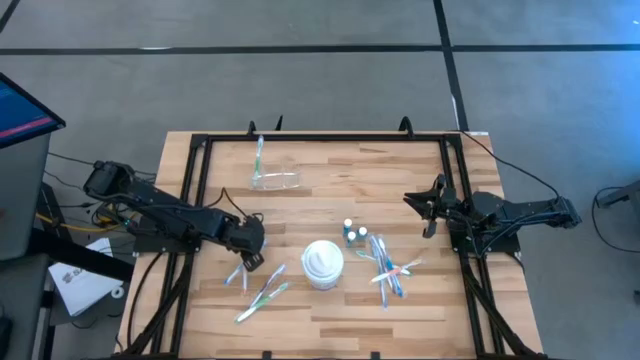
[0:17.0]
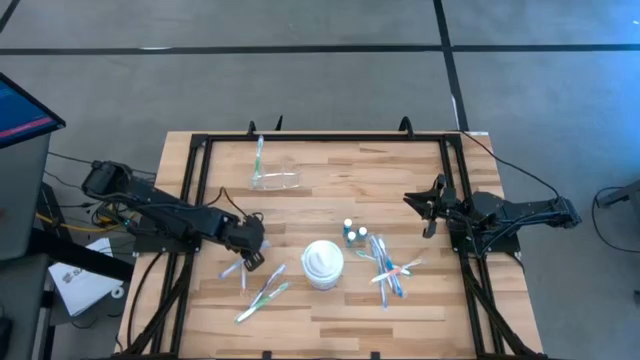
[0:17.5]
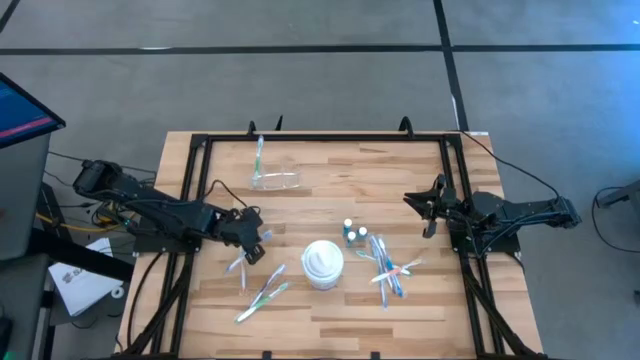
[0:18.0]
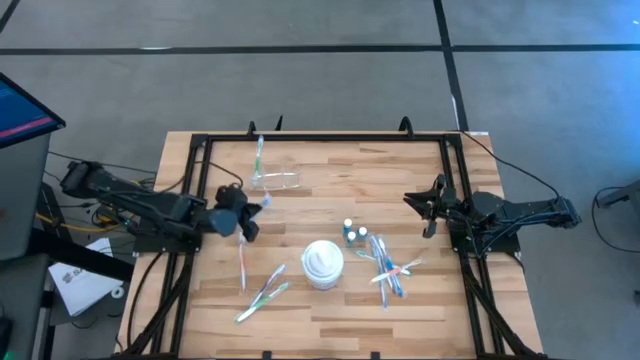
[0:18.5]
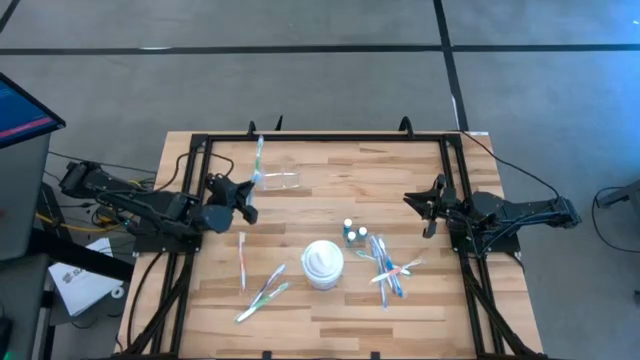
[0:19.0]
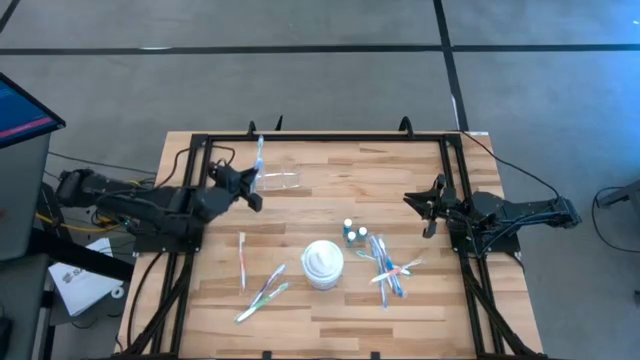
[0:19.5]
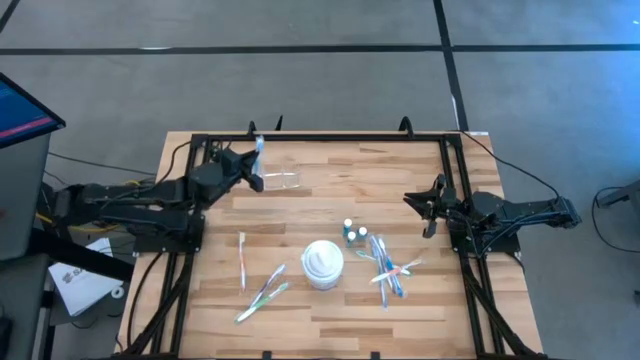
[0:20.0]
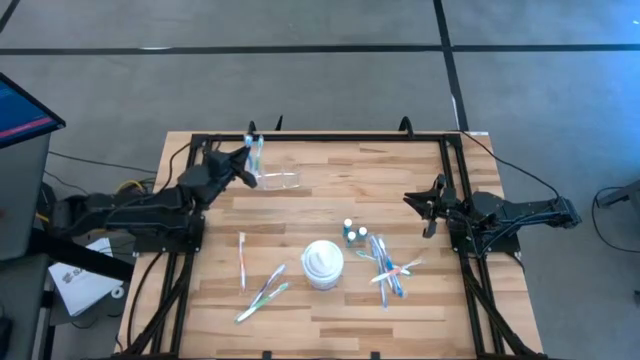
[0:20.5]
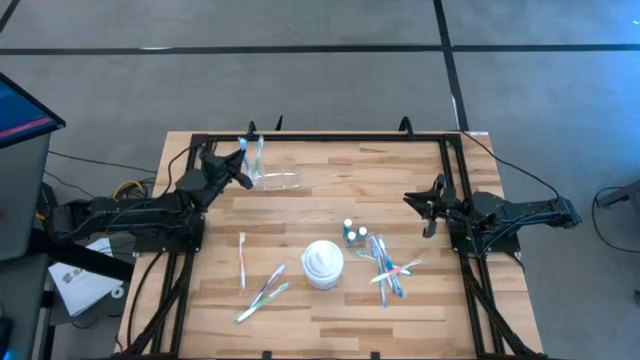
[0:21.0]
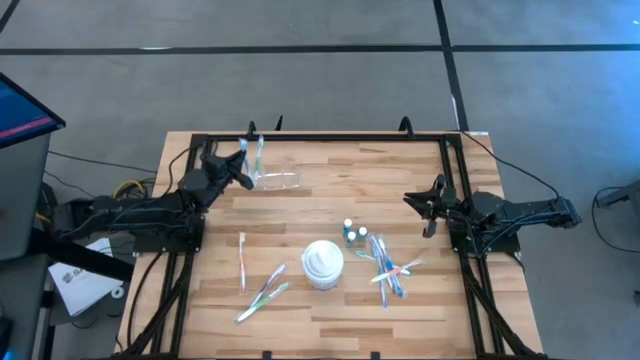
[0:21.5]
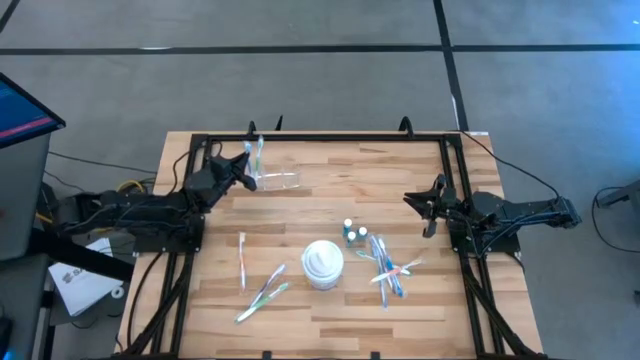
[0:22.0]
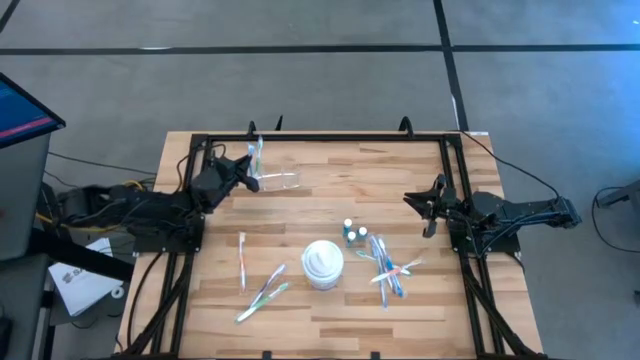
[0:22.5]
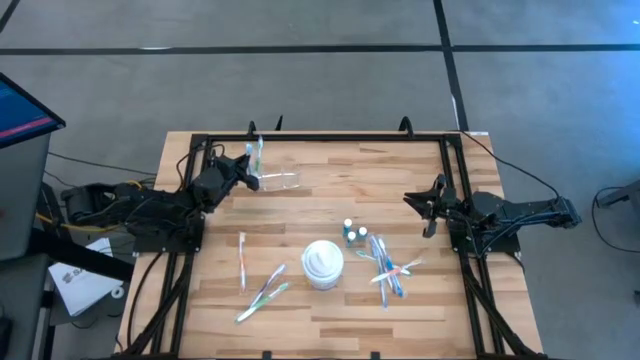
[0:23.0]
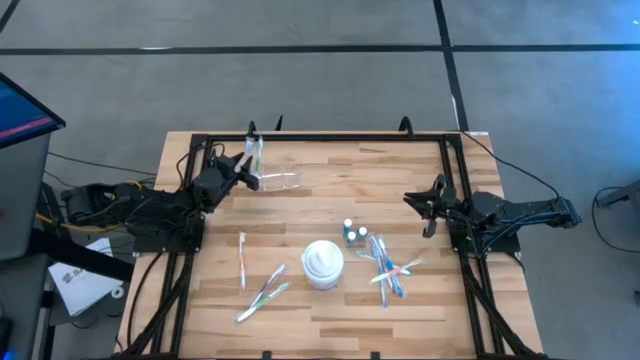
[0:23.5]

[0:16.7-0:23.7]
Task: Pick & Place toothbrushing station
Put the left blue toothbrush into the transparent organizer

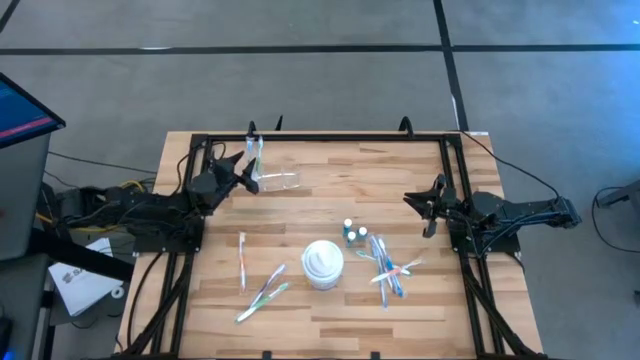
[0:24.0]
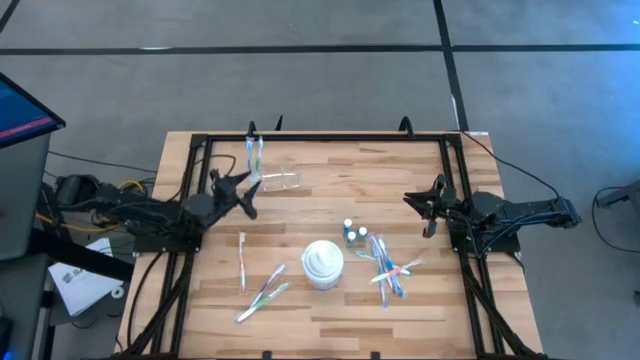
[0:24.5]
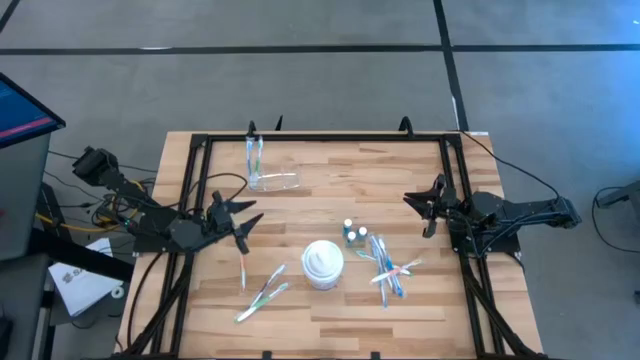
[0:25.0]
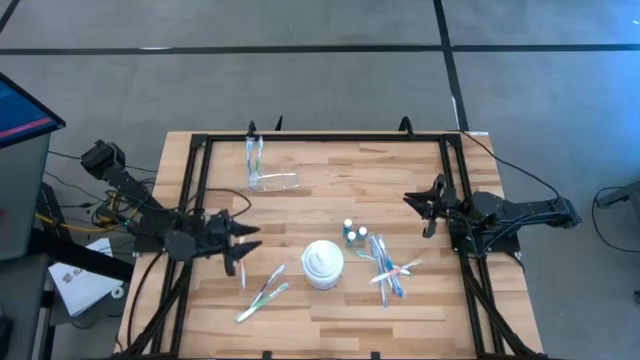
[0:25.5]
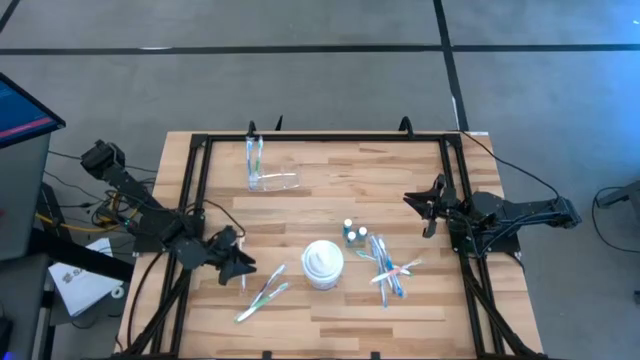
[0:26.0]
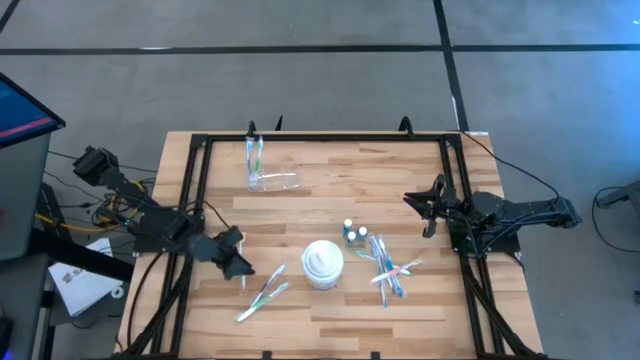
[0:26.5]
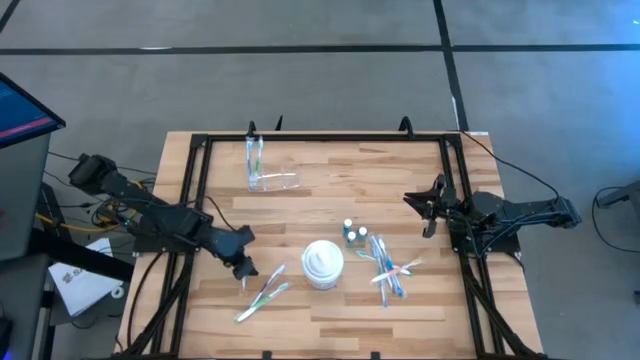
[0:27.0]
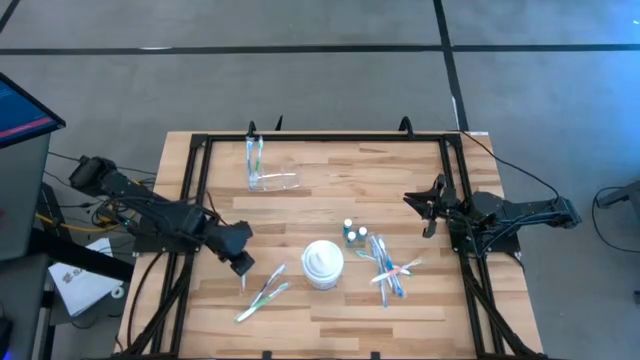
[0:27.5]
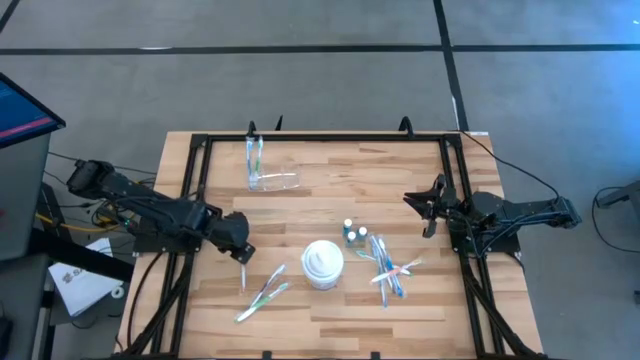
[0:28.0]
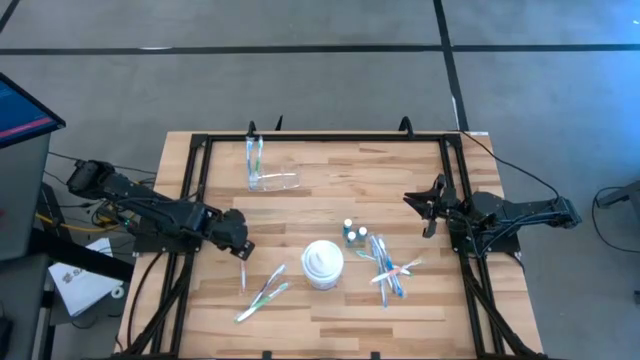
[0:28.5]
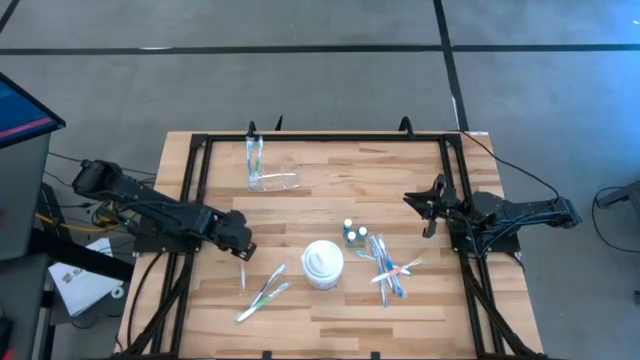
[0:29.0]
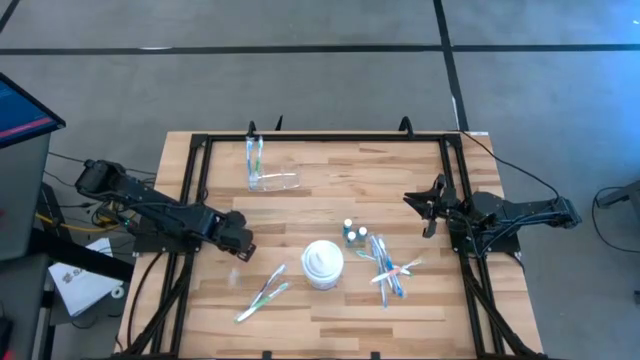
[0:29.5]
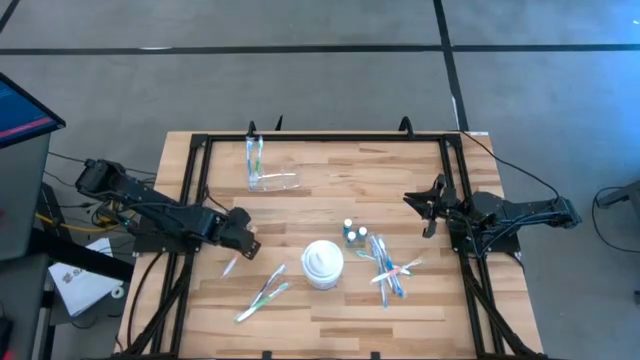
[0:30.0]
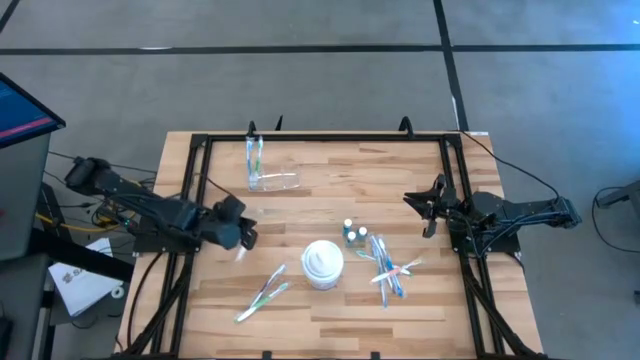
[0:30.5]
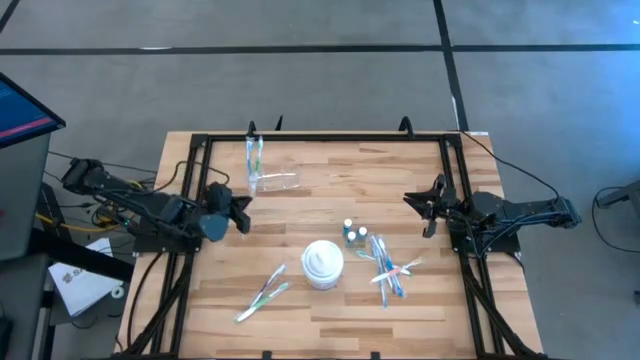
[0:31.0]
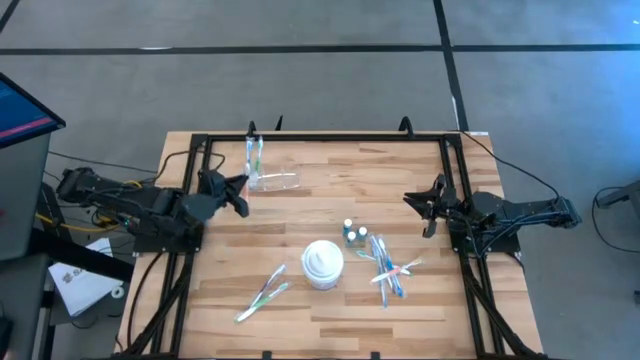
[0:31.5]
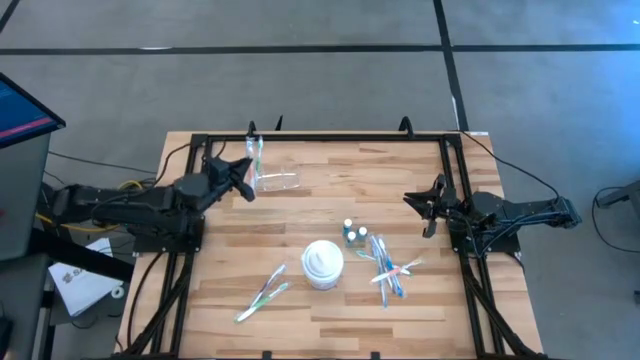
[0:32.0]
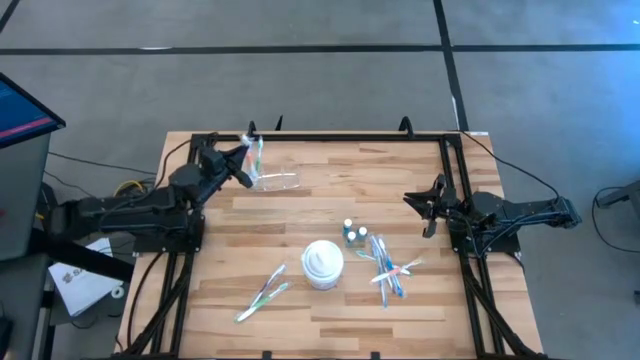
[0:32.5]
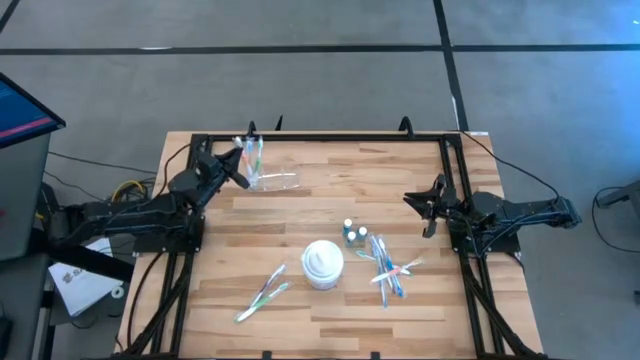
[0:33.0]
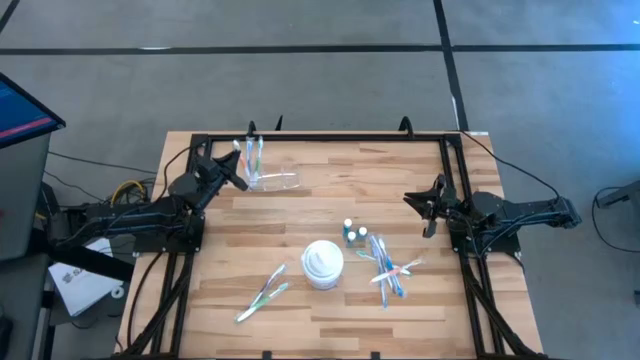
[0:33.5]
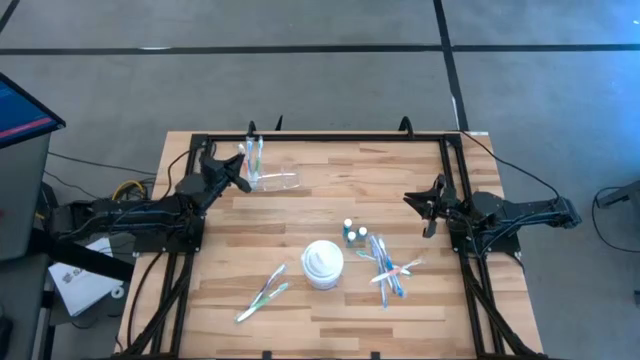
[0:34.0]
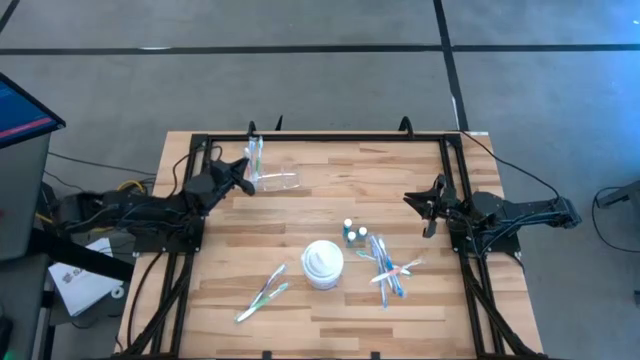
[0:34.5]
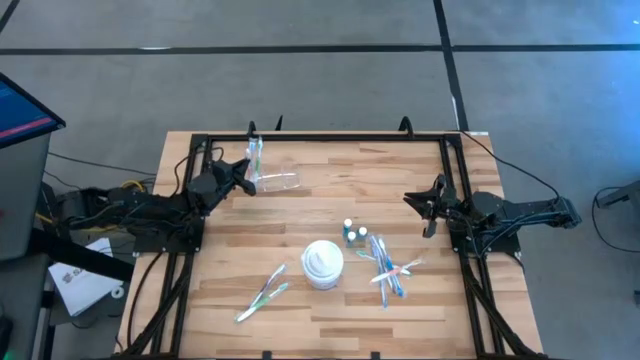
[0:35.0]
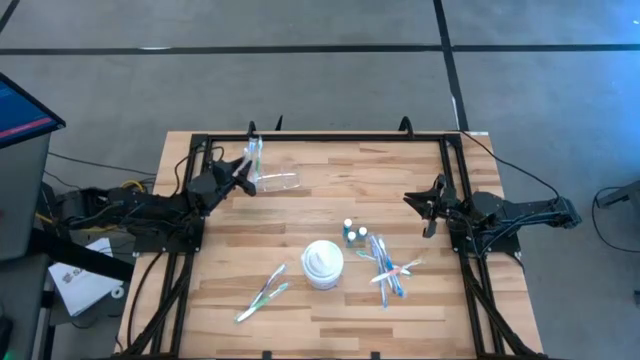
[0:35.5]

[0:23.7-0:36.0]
Put the left orange toothbrush into the transparent organizer

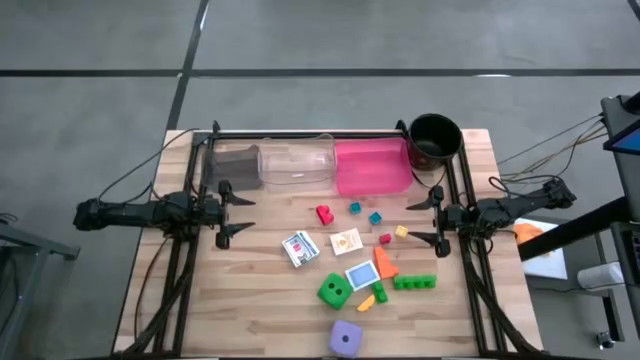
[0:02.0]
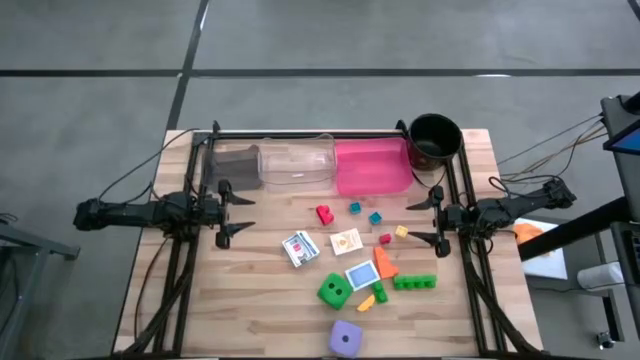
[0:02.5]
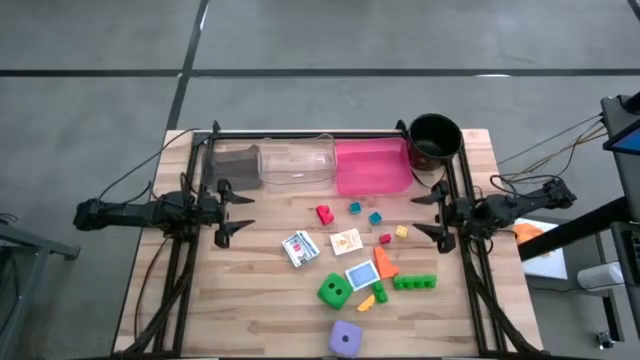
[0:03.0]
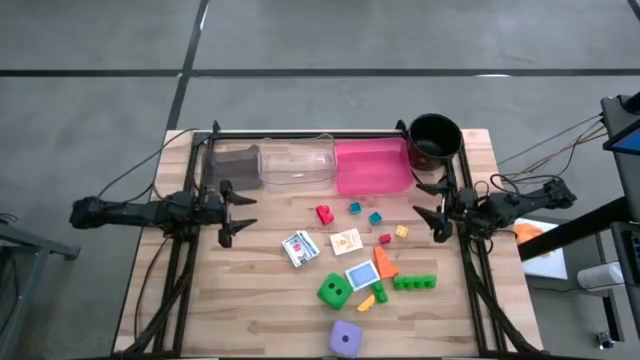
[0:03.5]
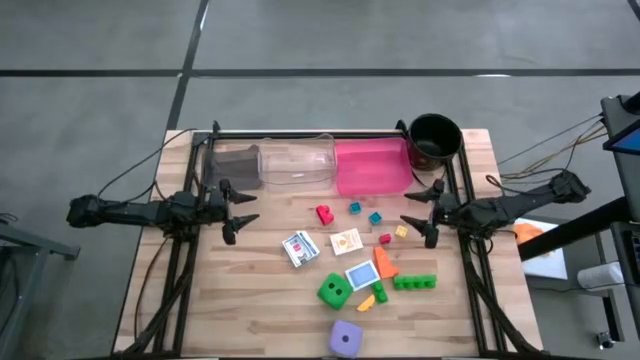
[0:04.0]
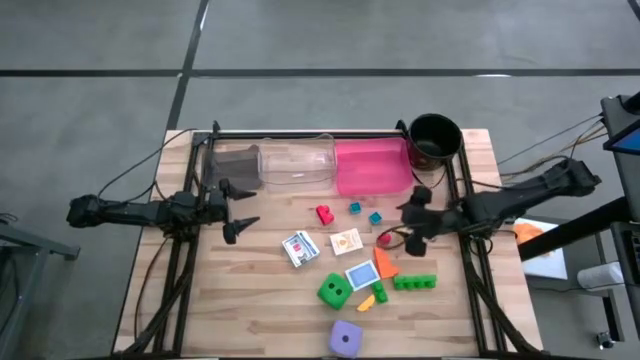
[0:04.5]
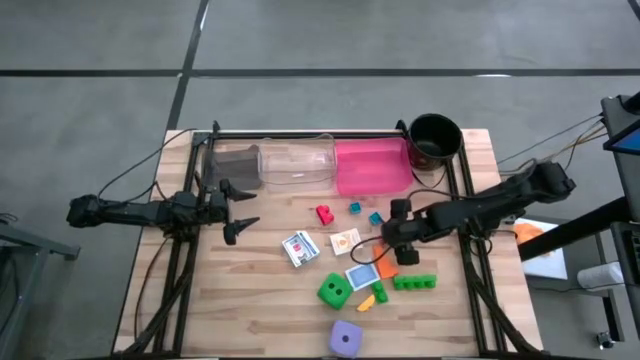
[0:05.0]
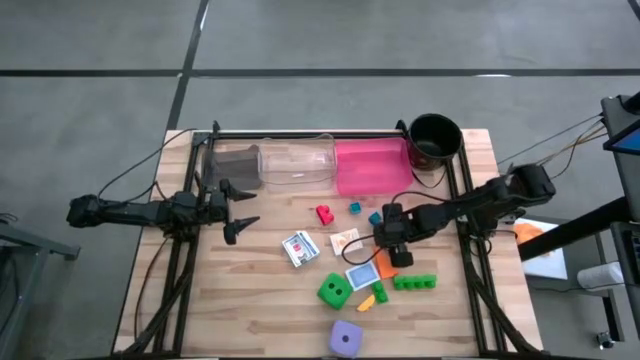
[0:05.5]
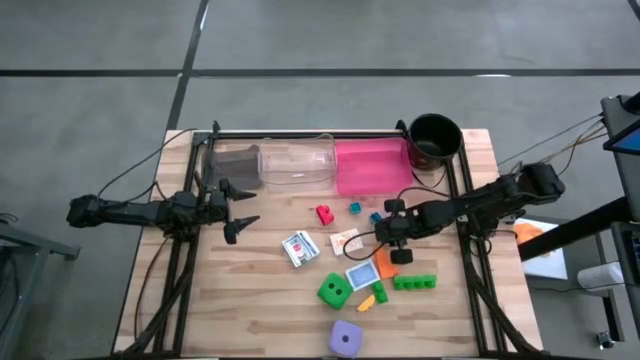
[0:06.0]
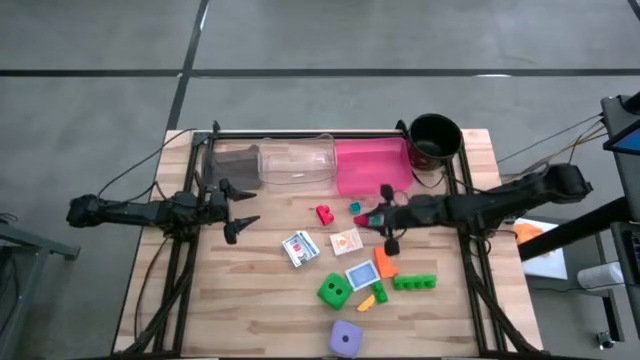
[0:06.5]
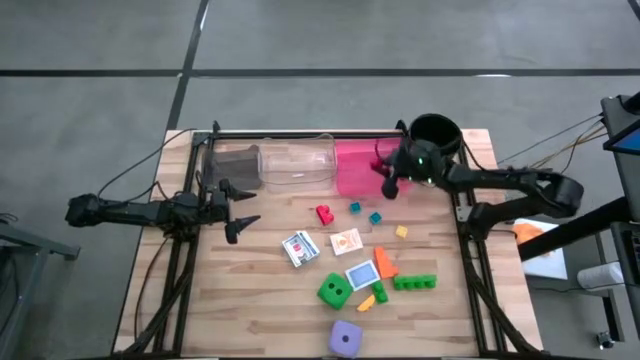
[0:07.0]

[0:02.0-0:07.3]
Task: Pick & Place Toys
Put the red game piece into the pink bin
